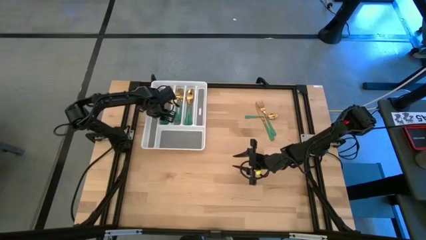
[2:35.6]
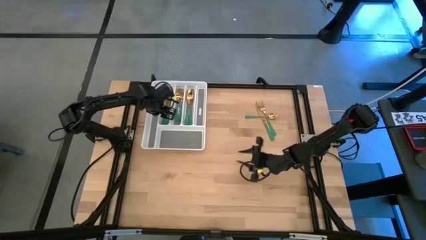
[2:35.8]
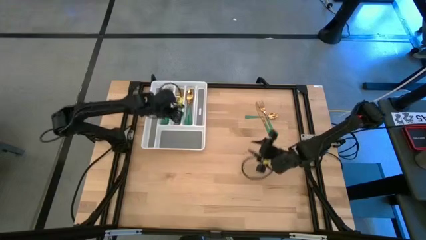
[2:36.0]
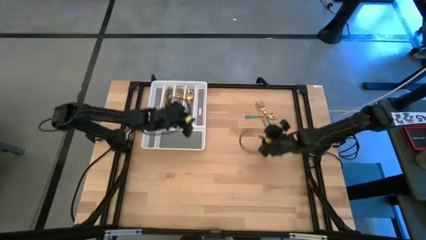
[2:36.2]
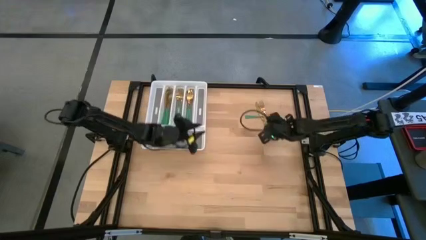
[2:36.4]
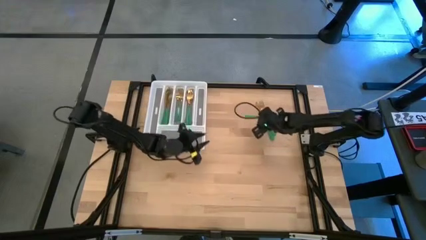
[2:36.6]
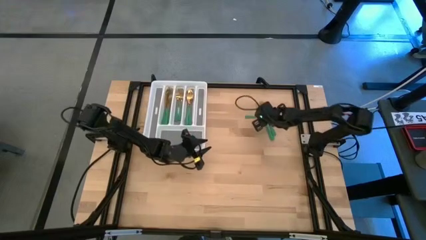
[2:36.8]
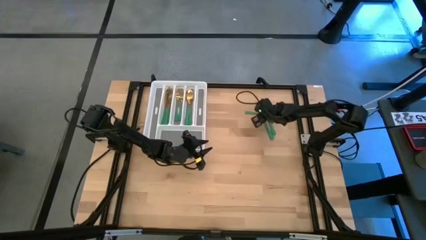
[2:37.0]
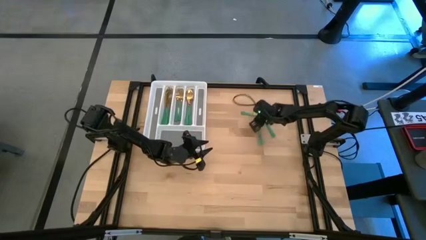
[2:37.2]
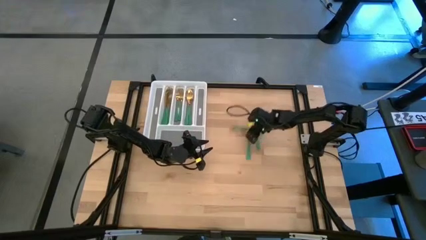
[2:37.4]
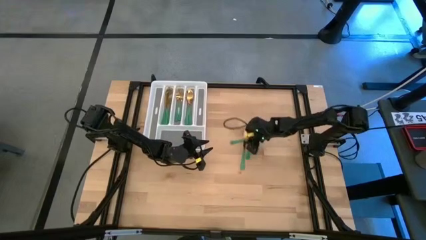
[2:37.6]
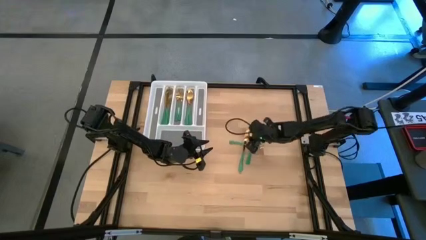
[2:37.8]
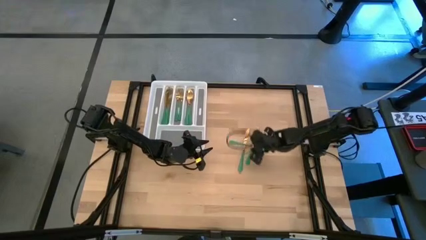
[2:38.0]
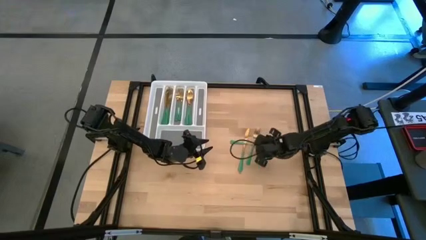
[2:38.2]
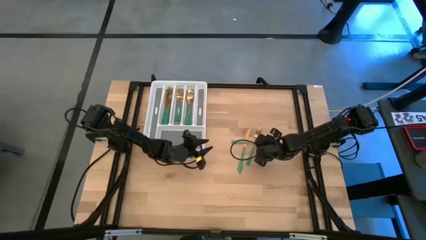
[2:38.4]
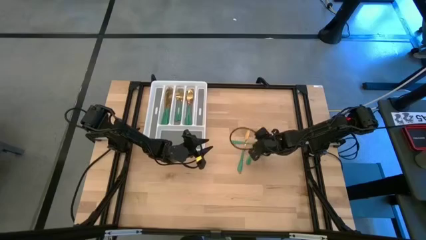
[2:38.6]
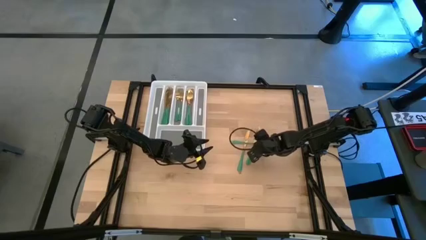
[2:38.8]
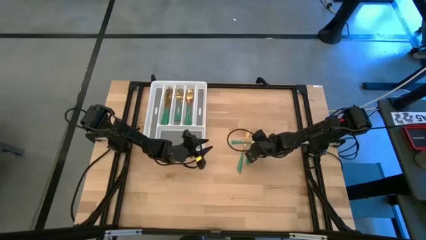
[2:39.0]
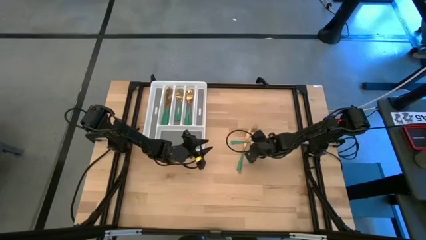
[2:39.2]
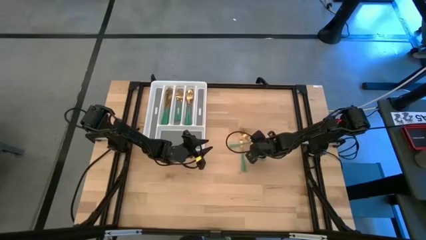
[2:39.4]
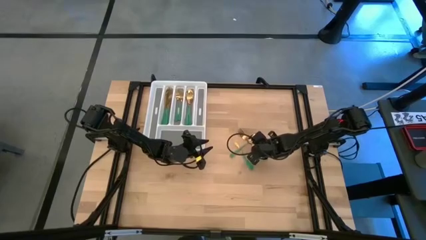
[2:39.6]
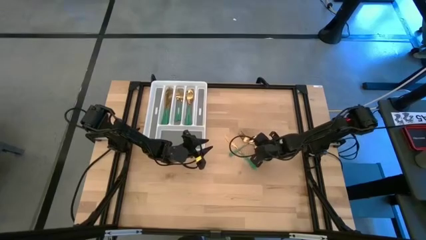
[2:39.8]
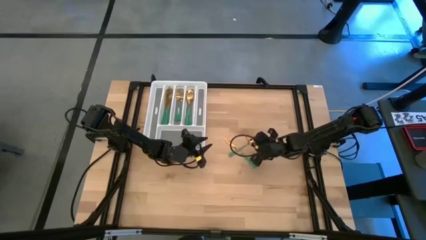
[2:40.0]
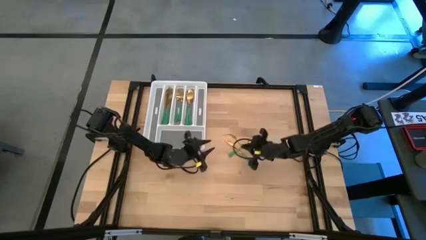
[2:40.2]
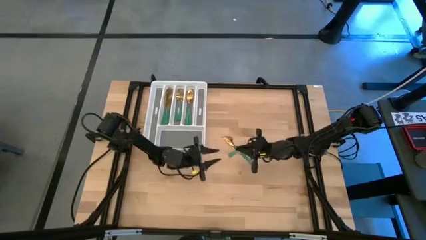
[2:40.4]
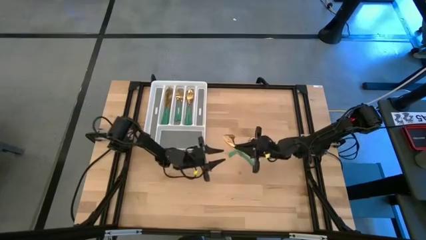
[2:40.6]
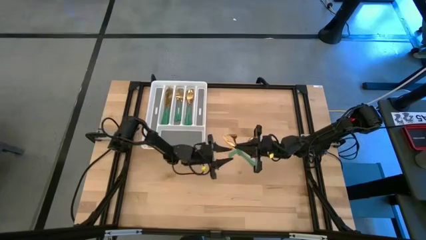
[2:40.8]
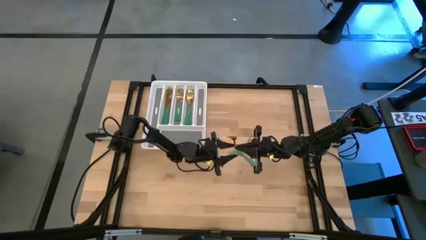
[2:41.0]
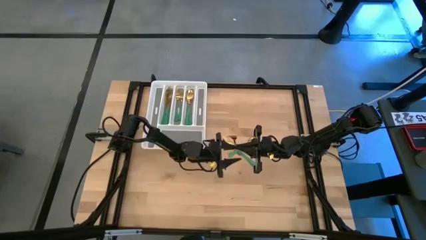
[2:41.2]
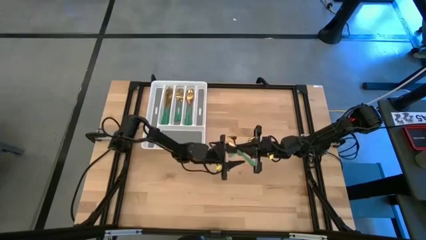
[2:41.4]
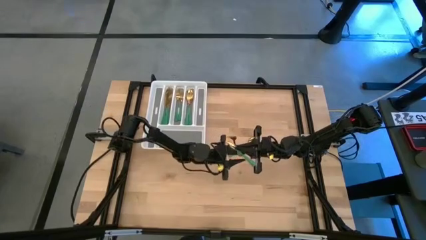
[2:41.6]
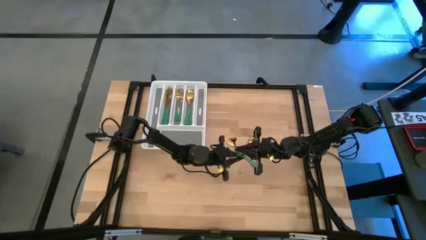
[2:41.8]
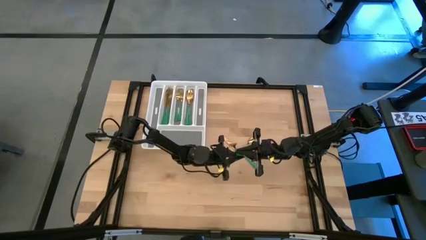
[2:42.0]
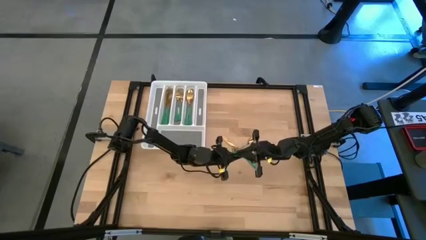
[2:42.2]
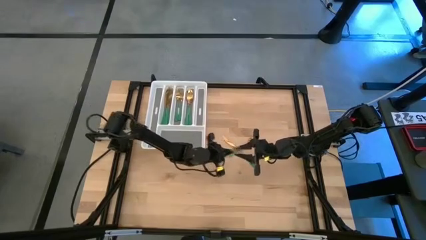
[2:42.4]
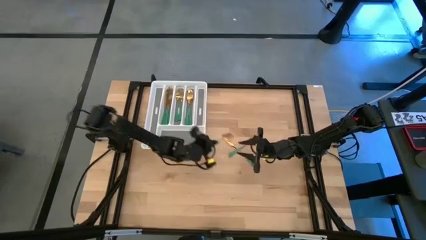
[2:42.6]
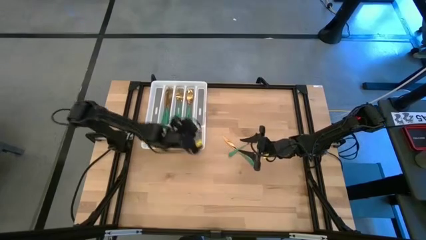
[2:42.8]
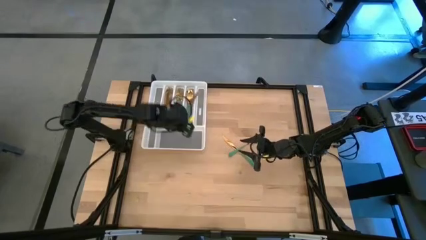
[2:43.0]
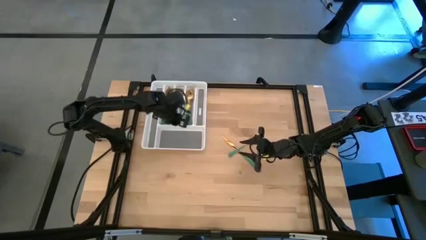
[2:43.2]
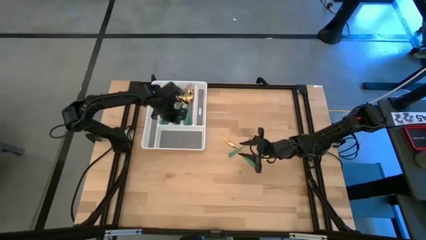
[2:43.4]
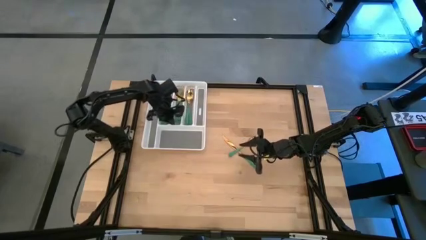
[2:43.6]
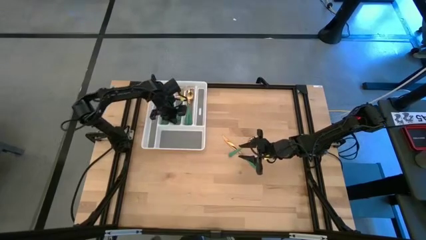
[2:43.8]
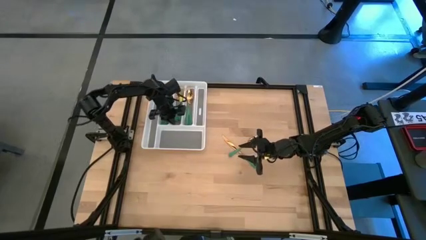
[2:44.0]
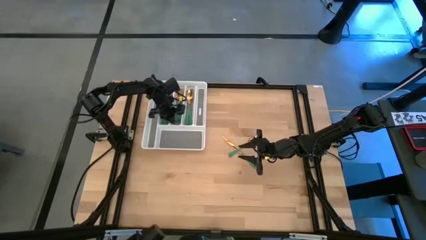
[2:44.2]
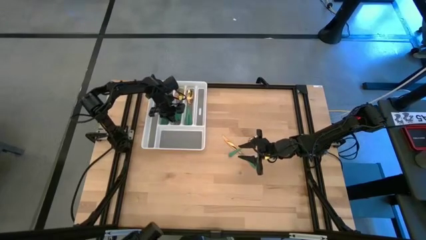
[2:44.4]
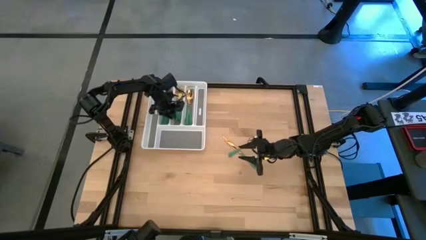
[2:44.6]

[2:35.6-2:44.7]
Task: Sort silverware
Put the green fork into the white cutlery tray

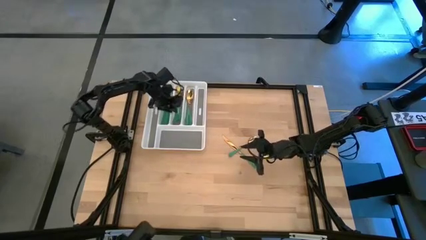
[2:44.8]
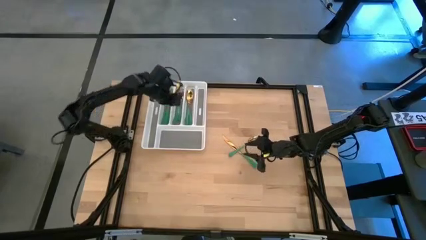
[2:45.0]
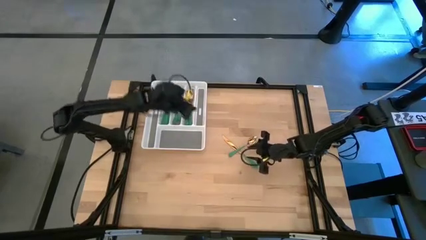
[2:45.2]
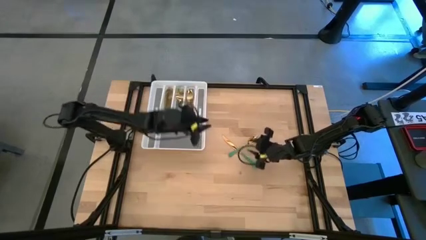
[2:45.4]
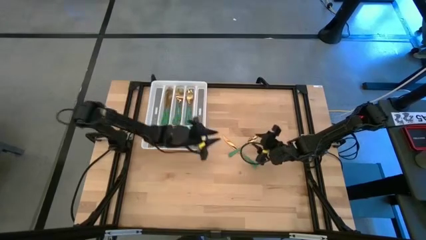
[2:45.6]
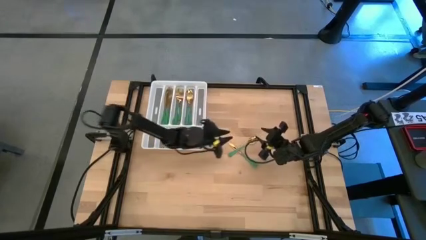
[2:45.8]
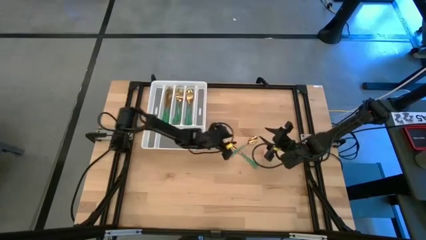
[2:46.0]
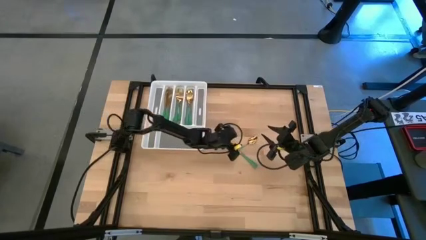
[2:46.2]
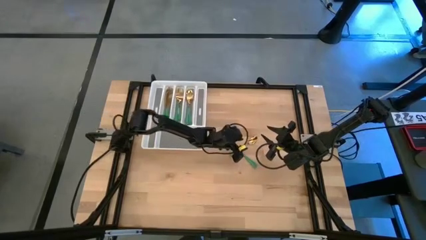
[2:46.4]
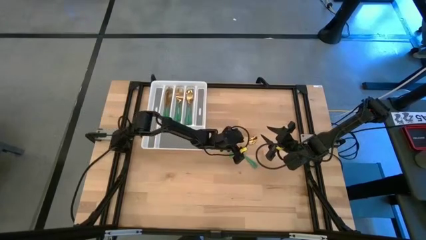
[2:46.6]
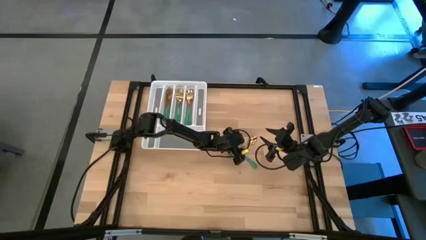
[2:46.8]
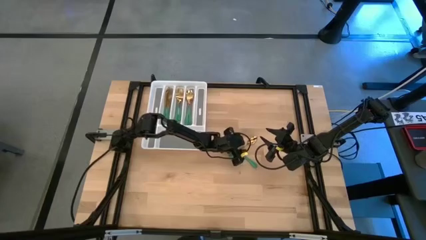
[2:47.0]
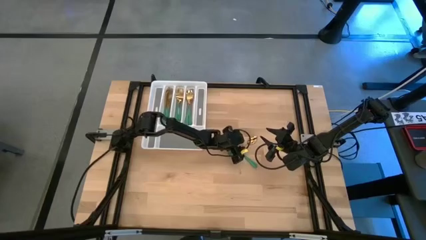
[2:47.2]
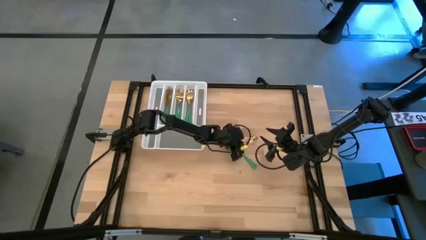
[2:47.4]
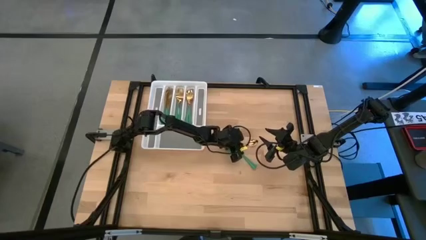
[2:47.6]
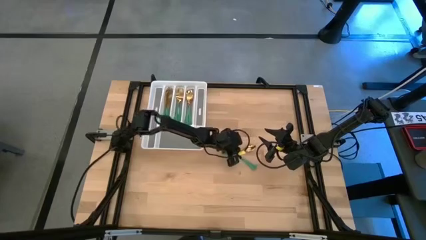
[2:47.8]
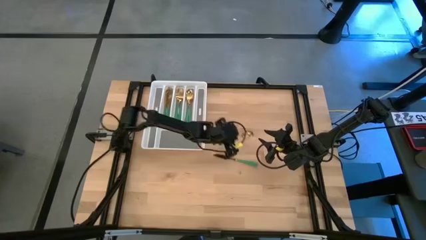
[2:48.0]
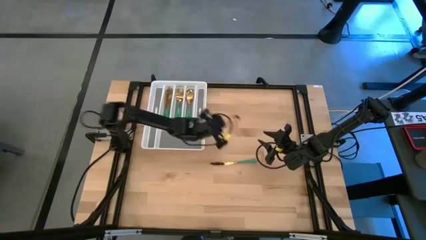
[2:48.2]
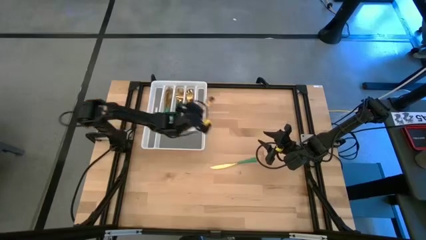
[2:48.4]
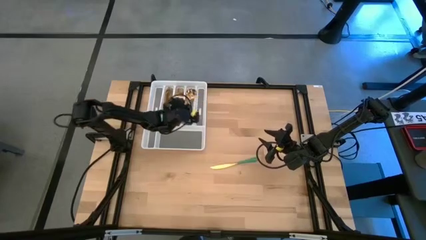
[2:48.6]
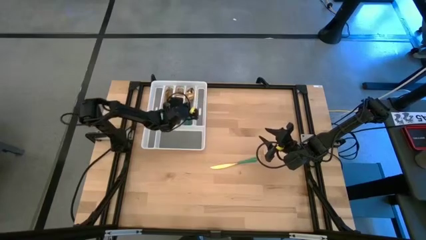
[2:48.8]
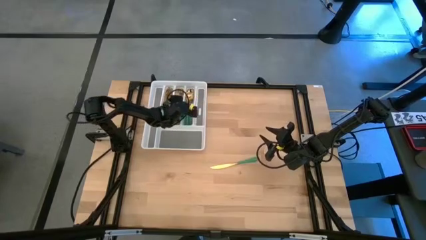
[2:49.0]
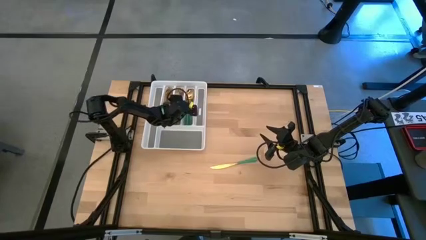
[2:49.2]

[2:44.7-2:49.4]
Put the green spoon into the white cutlery tray
